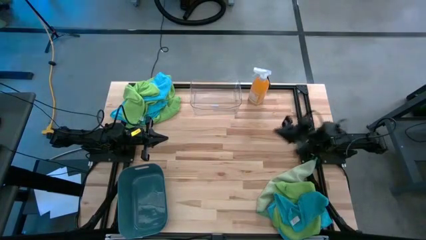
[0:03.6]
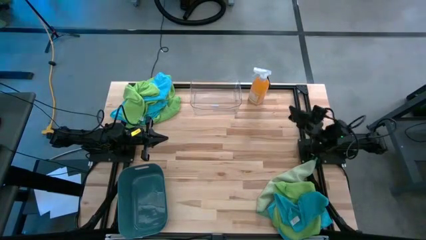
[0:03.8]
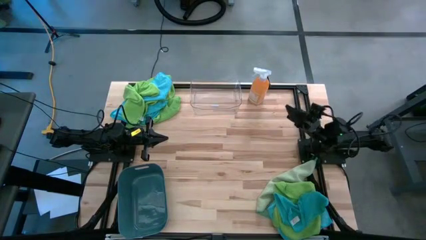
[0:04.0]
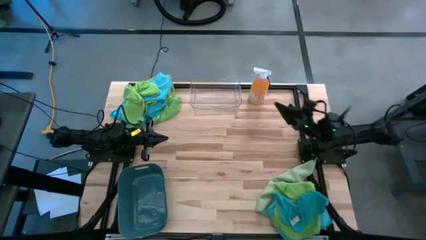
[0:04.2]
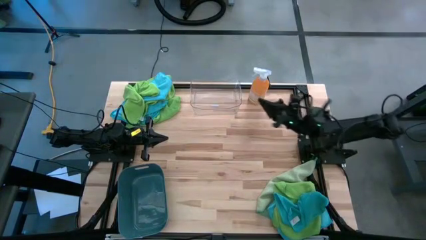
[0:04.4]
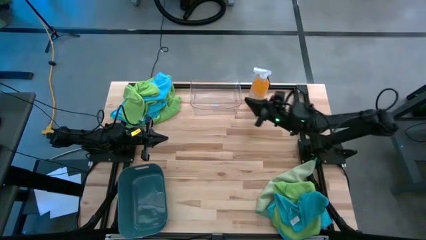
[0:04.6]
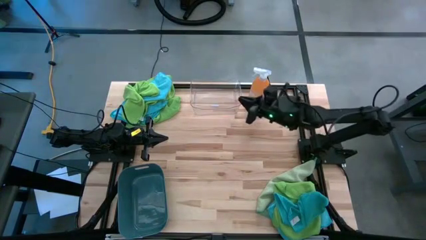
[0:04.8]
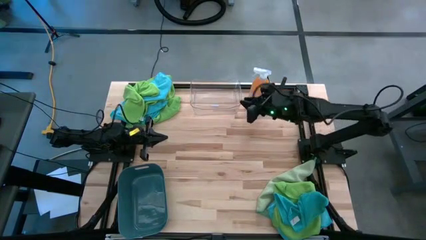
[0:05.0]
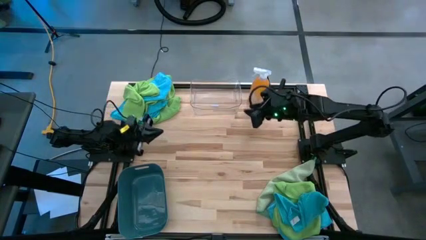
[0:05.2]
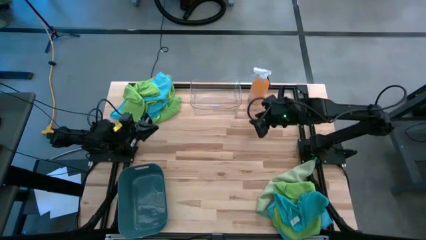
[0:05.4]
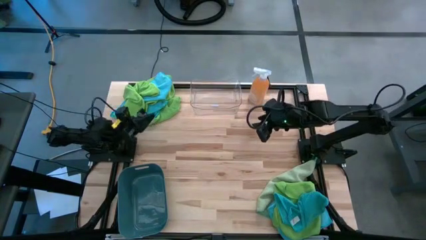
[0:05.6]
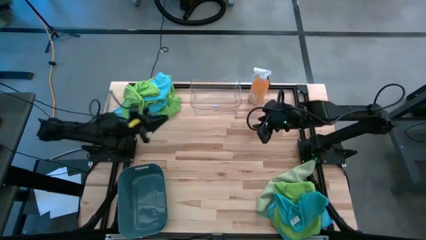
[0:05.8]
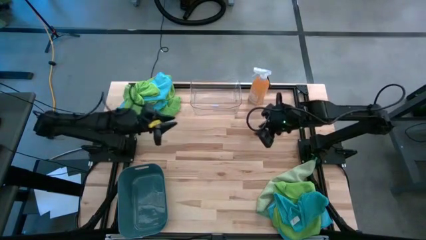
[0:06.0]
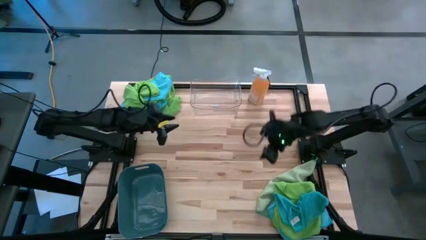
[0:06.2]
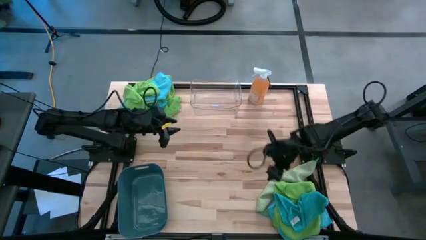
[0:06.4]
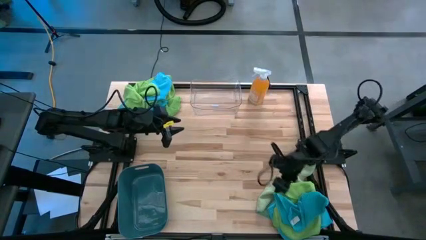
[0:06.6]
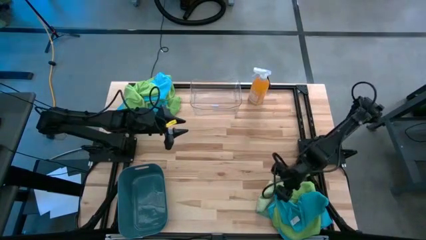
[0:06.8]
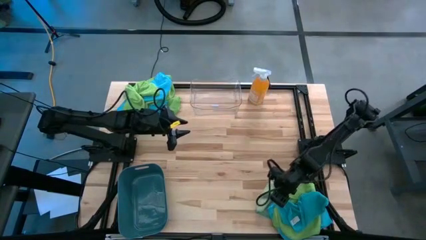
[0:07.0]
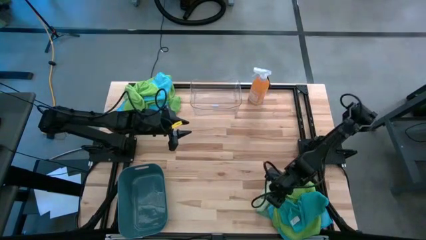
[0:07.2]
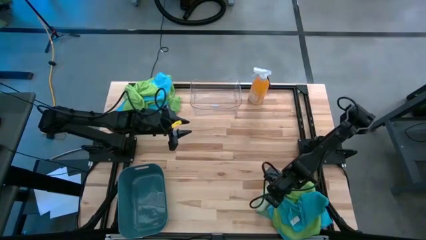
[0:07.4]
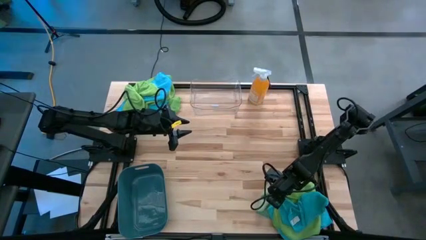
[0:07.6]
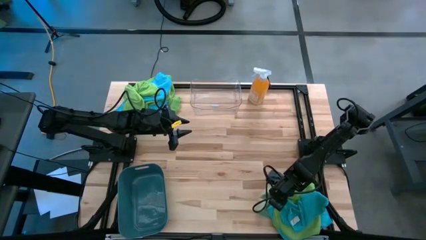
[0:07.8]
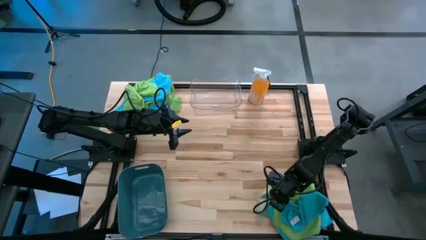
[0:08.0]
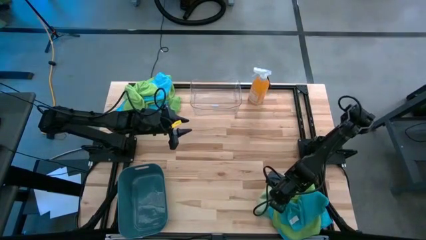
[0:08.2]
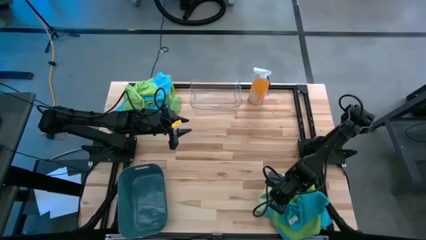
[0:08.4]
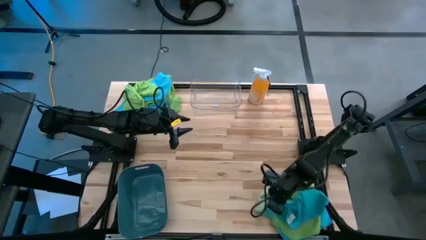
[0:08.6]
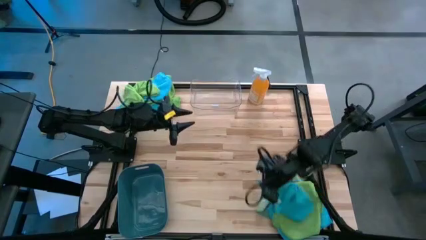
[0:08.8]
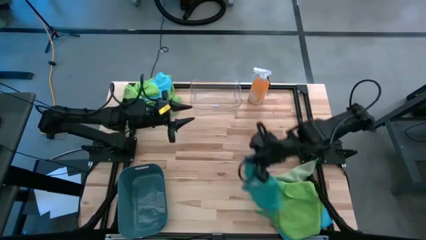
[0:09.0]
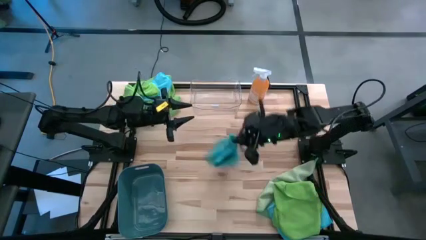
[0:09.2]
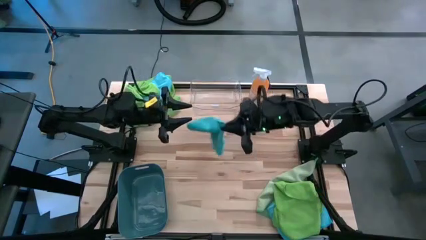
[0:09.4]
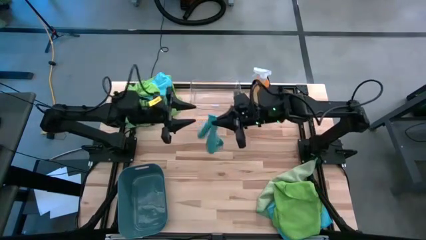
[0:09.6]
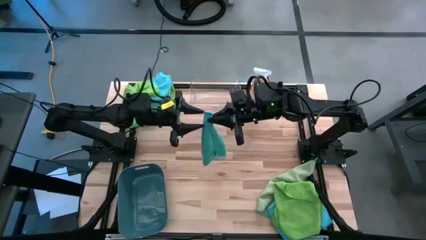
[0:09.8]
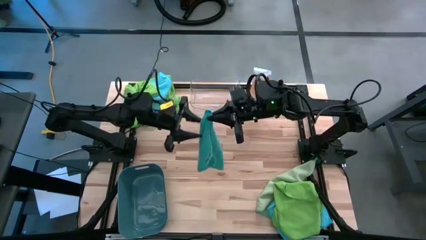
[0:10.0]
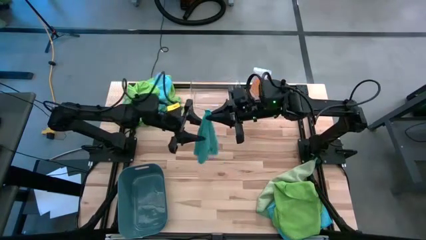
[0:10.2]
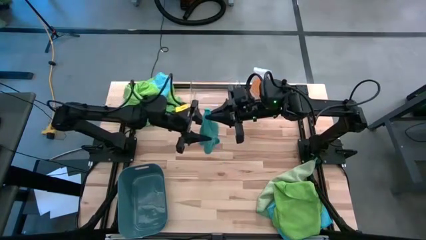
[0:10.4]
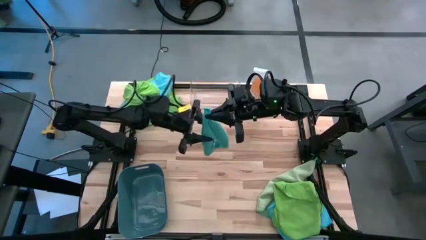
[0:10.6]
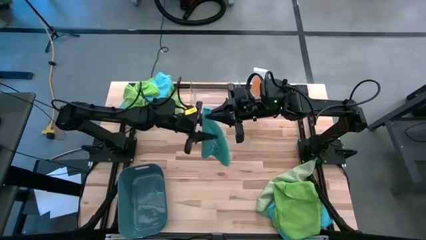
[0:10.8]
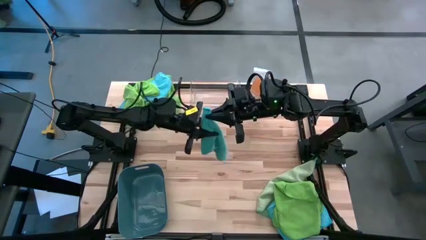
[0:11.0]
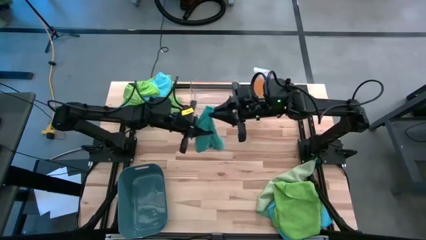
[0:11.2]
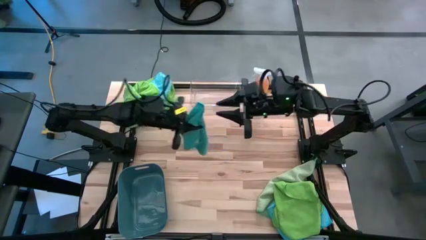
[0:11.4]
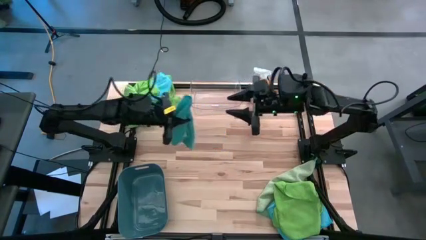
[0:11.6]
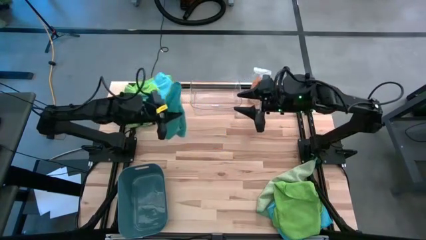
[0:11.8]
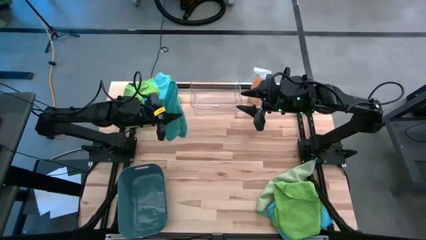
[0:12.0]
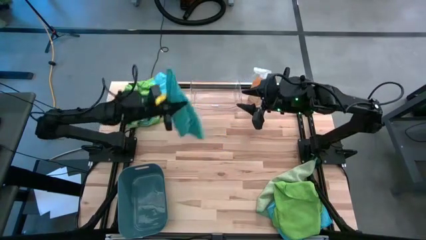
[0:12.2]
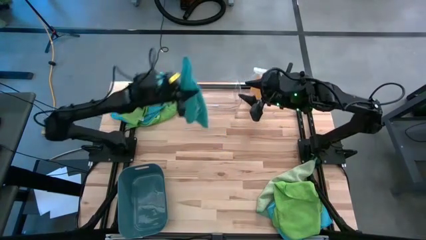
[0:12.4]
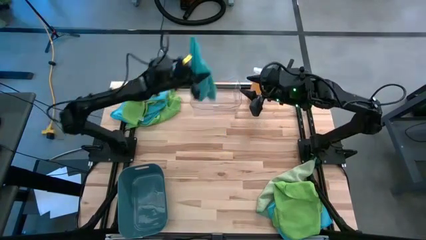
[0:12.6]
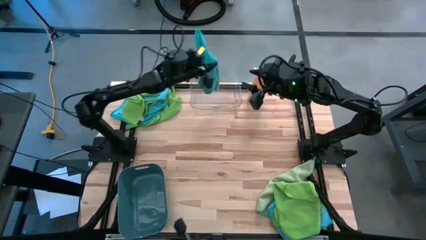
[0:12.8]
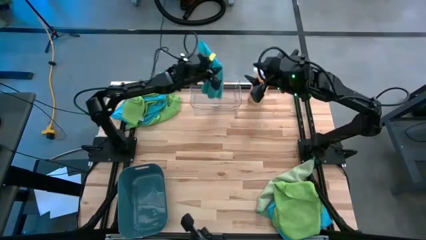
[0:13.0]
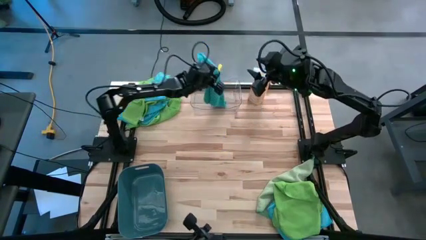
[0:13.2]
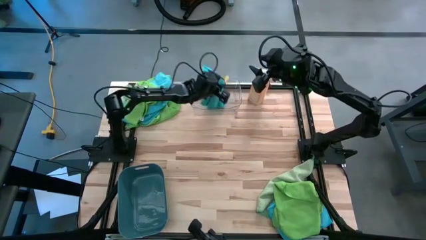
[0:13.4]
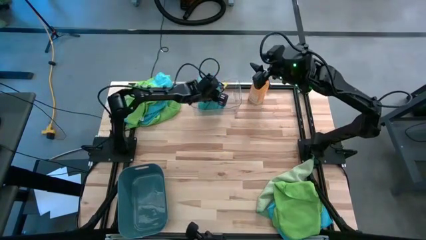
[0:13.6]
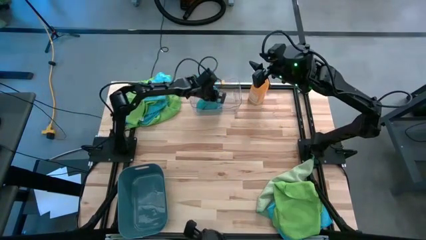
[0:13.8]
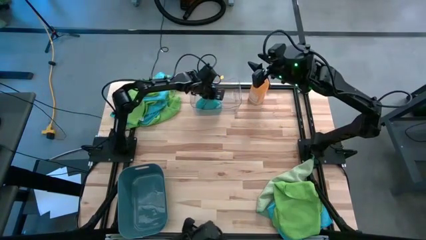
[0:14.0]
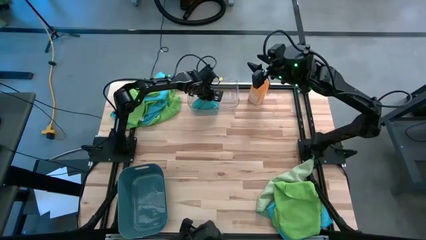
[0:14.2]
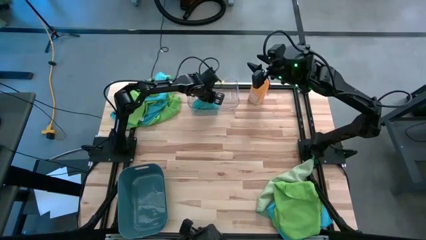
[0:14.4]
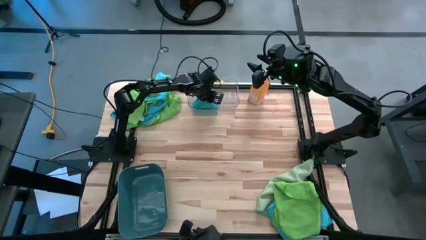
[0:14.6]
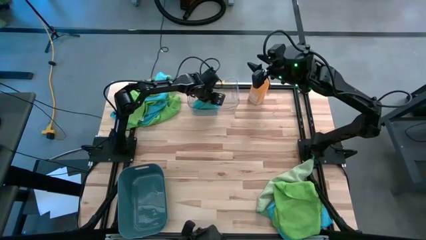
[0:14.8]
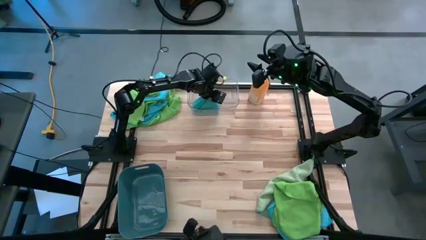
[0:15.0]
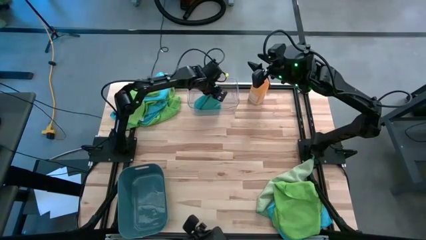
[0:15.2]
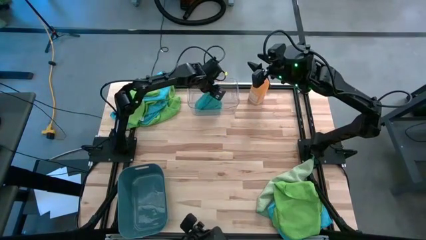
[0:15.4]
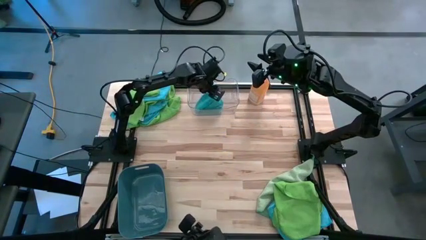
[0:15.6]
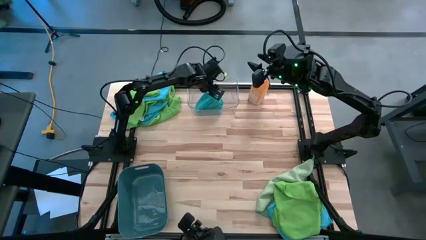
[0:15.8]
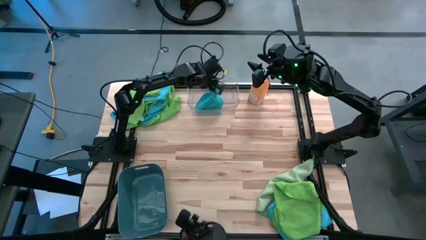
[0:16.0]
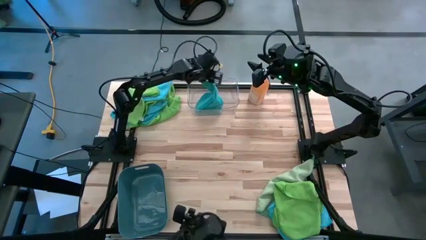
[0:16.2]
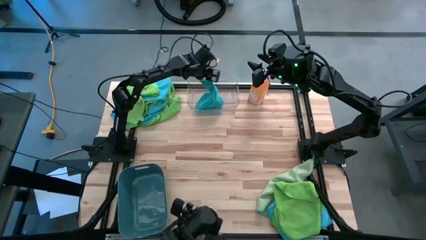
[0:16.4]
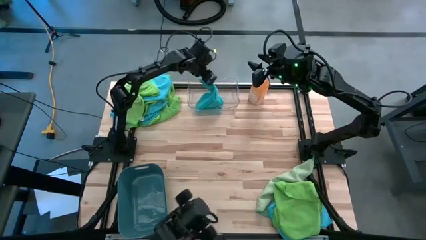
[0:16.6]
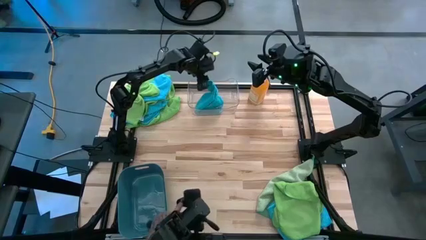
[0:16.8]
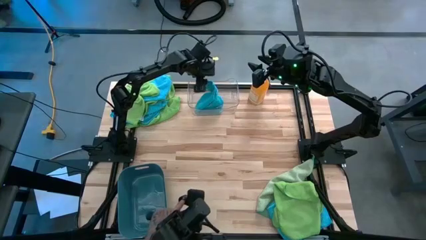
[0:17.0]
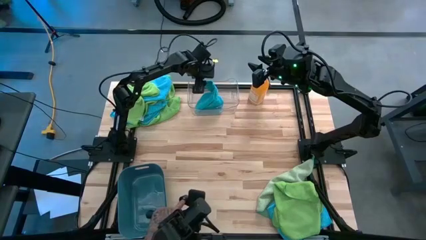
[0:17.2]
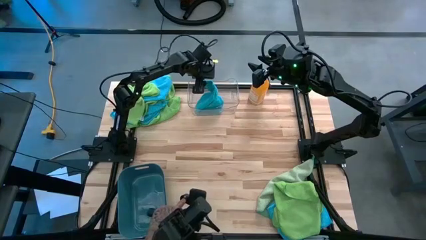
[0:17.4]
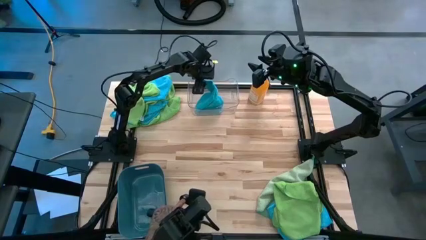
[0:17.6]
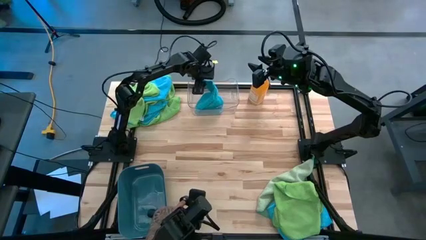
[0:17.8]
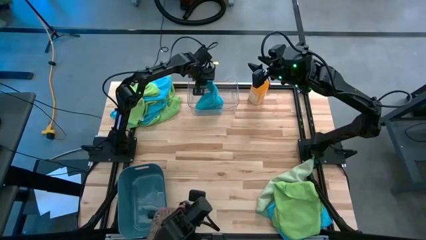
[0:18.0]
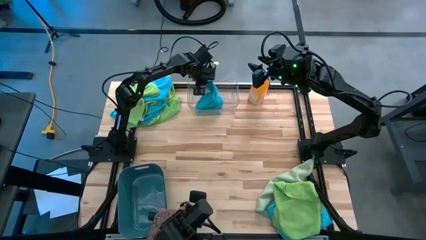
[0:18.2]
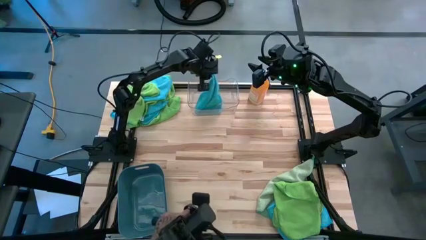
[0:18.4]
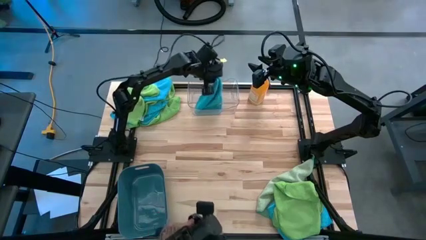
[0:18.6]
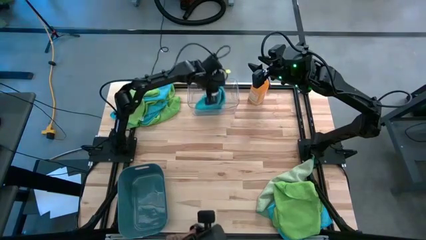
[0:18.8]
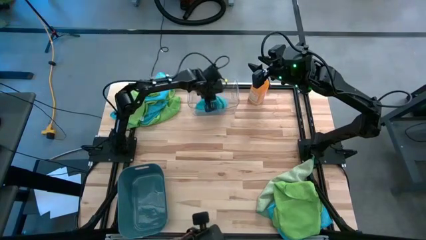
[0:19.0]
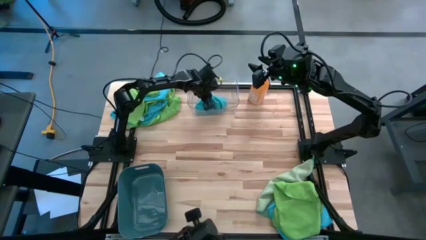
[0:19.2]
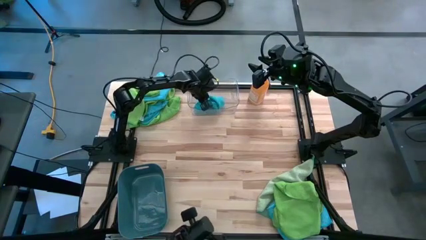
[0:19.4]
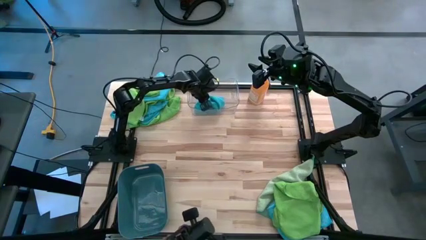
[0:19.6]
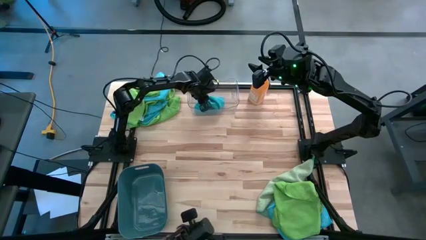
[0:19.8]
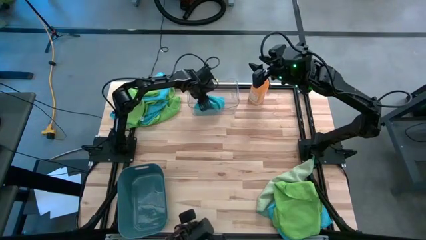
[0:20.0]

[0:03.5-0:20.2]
Task: Sort microfiber towel by color & place in baskets
Put the blue microfiber towel into the transparent bin
